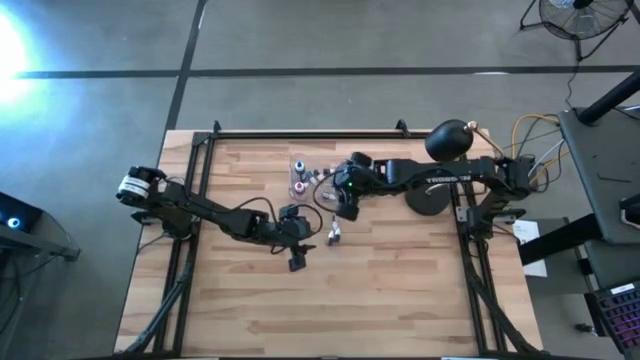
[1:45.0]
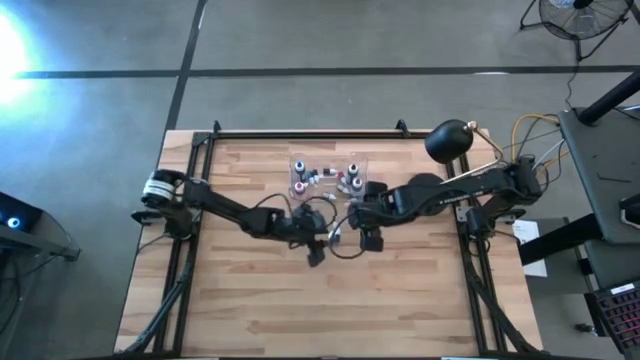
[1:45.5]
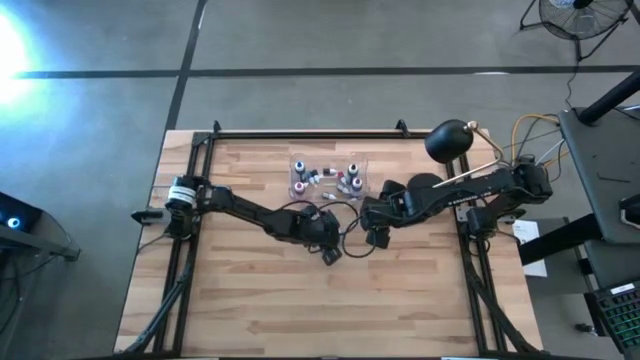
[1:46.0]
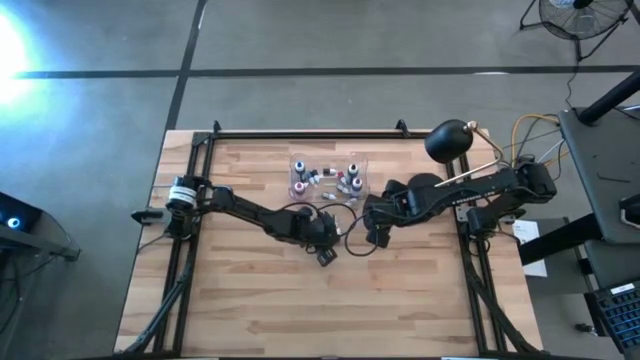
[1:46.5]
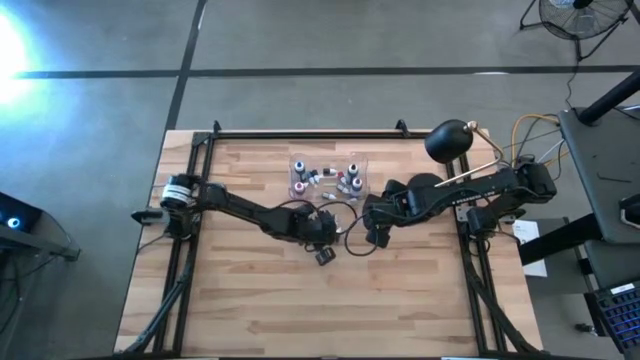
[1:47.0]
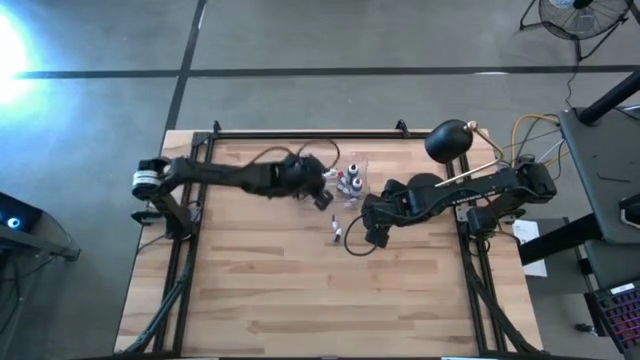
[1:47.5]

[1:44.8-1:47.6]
Task: Pick & Place food coloring
Put the small red food coloring bottle into the transparent bin

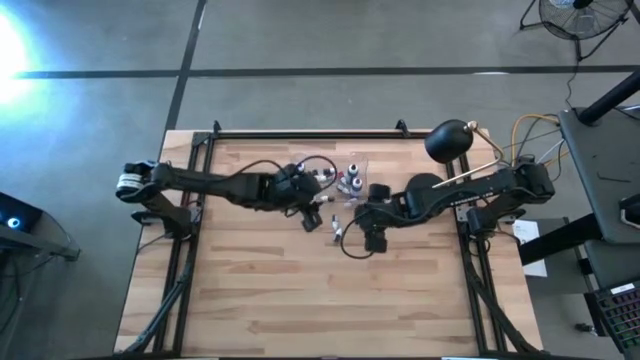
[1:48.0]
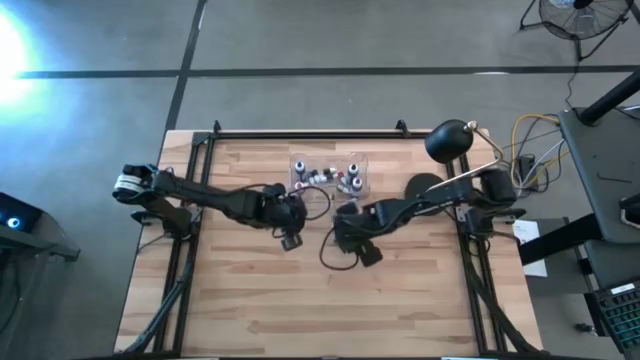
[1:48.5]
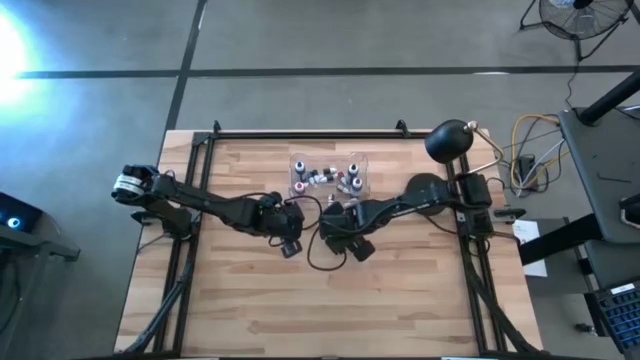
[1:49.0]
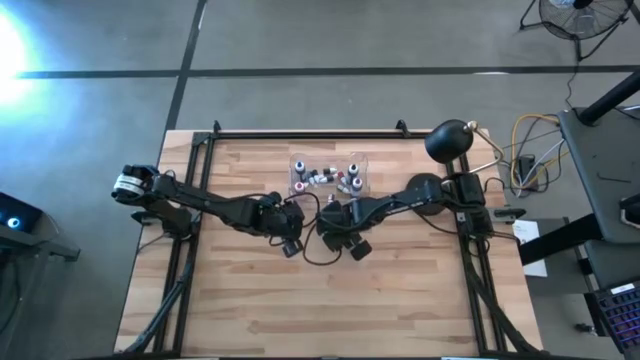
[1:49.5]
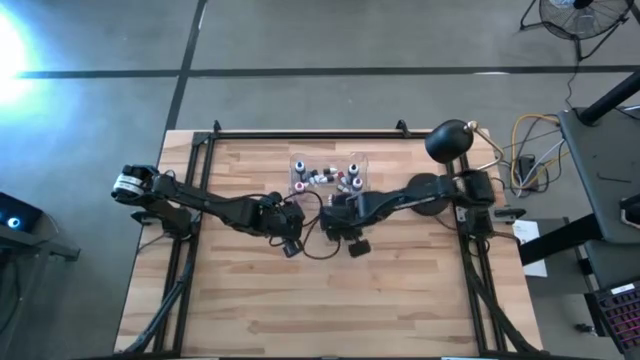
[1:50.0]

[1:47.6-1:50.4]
Put the small blue food coloring bottle into the transparent bin

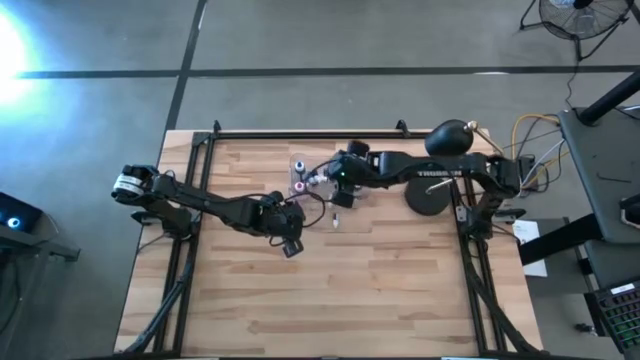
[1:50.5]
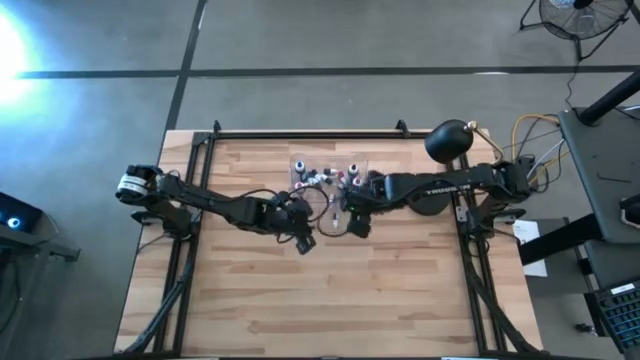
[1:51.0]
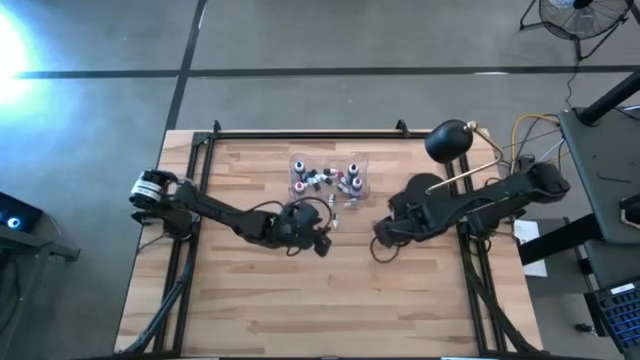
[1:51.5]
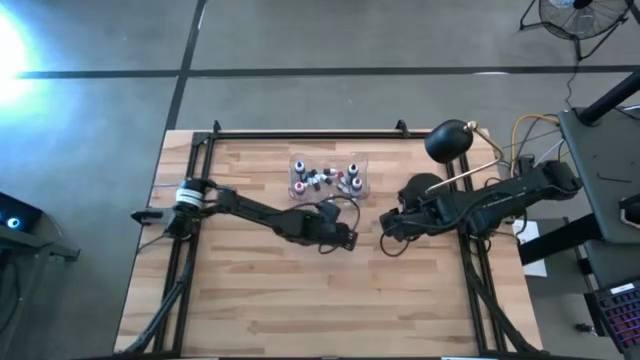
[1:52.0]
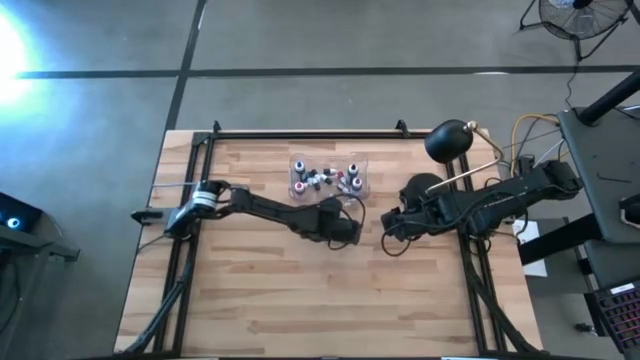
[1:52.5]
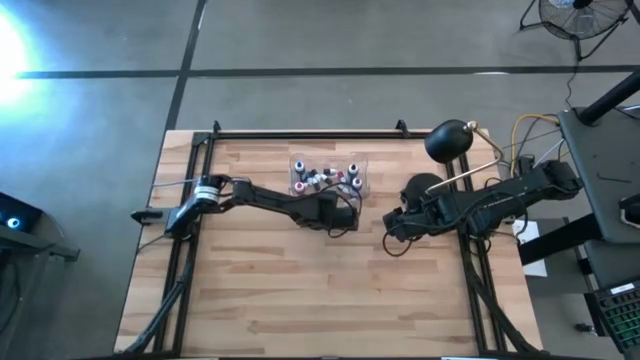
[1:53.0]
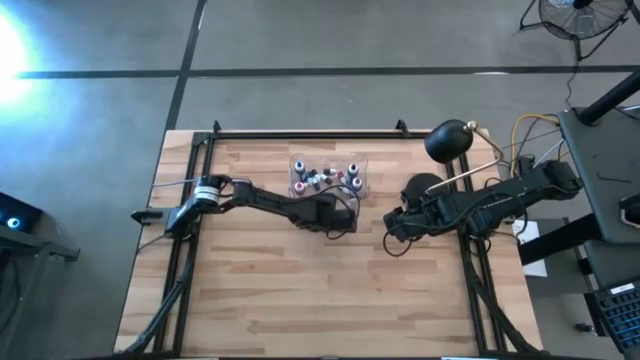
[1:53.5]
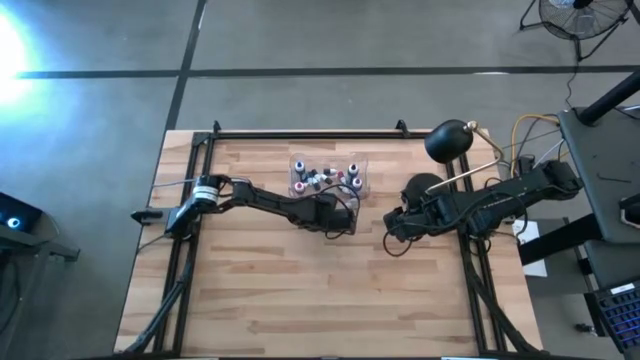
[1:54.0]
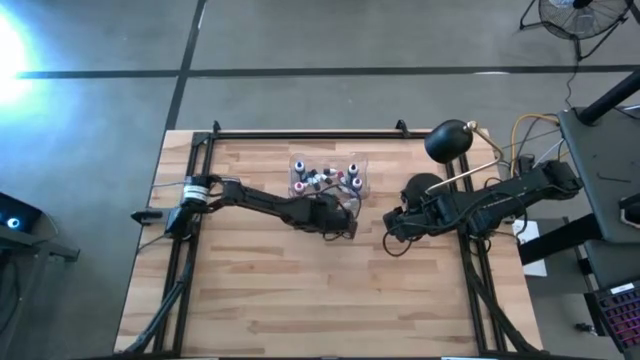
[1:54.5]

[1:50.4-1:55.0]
Put the small blue food coloring bottle into the transparent bin

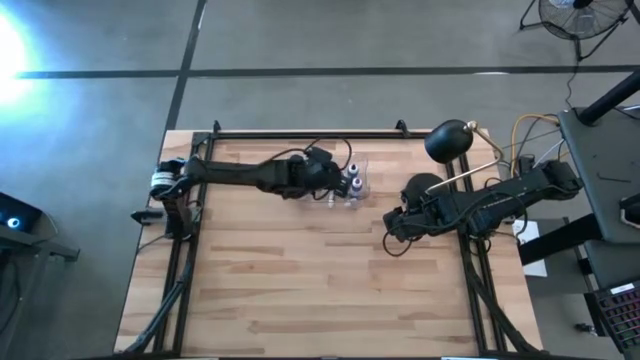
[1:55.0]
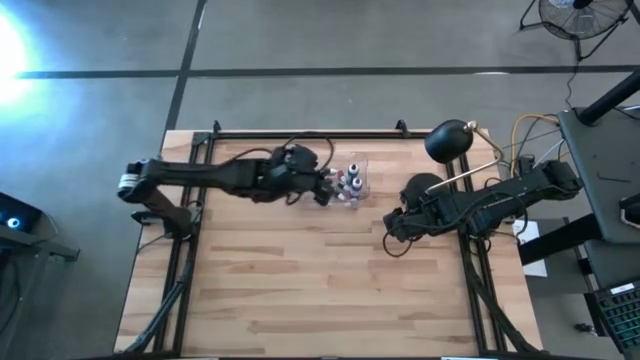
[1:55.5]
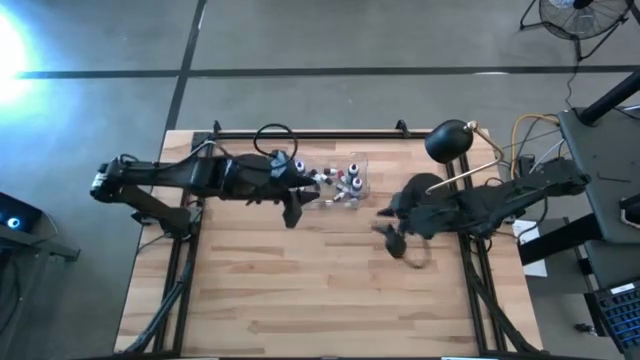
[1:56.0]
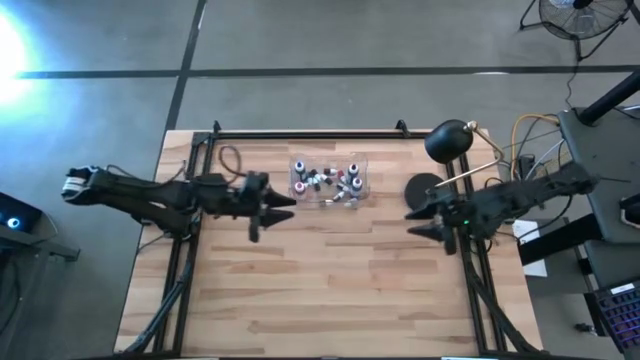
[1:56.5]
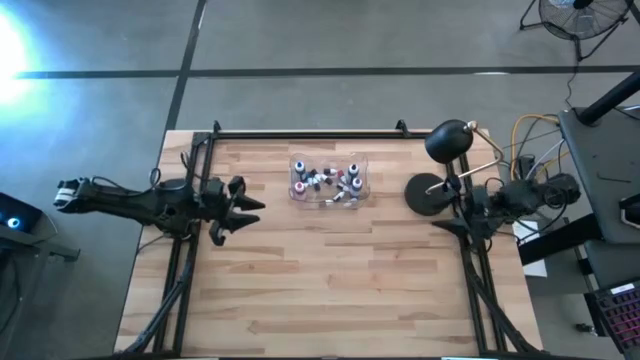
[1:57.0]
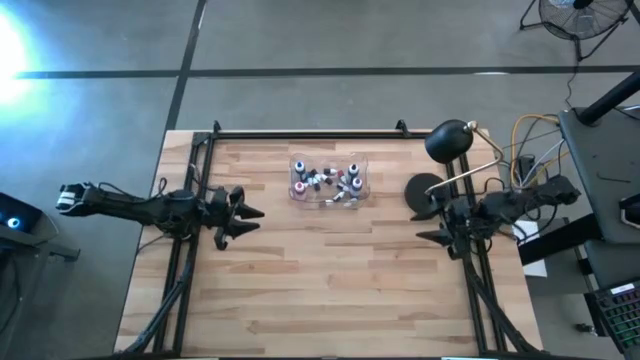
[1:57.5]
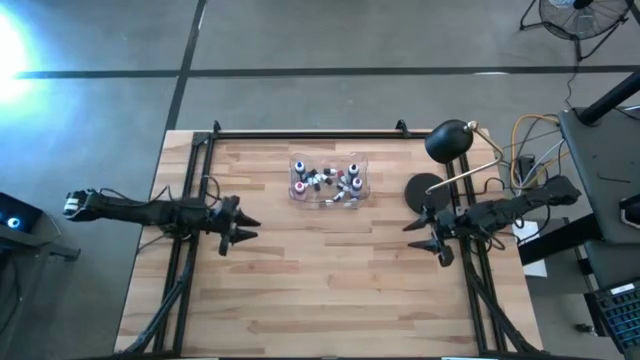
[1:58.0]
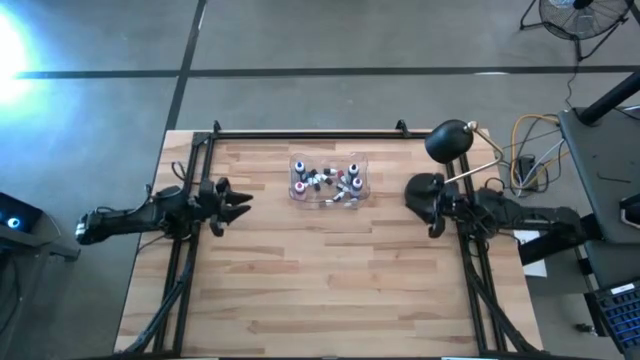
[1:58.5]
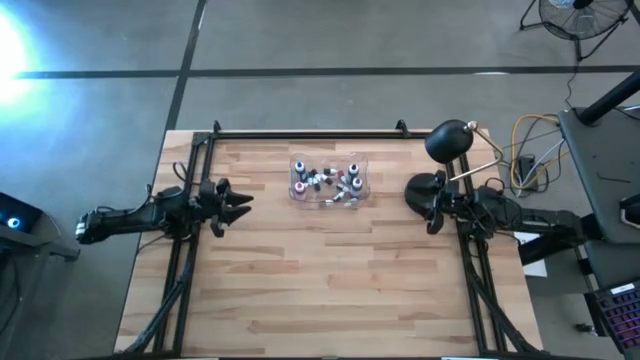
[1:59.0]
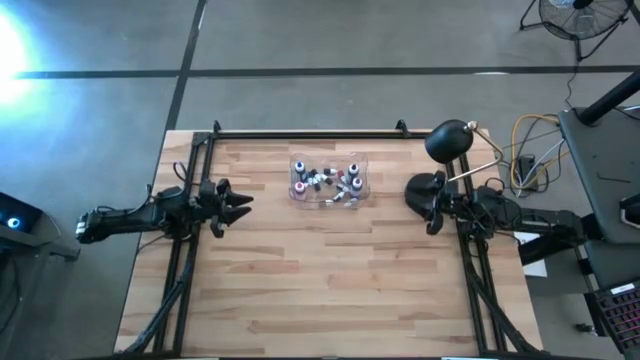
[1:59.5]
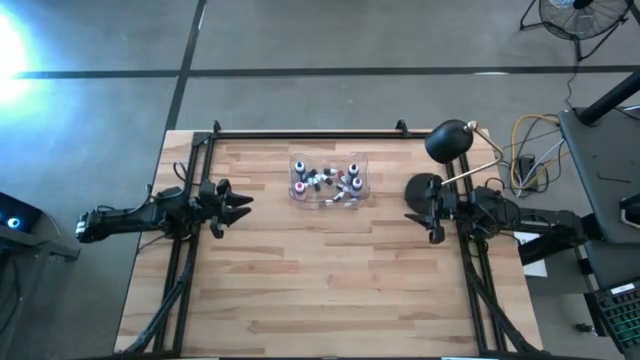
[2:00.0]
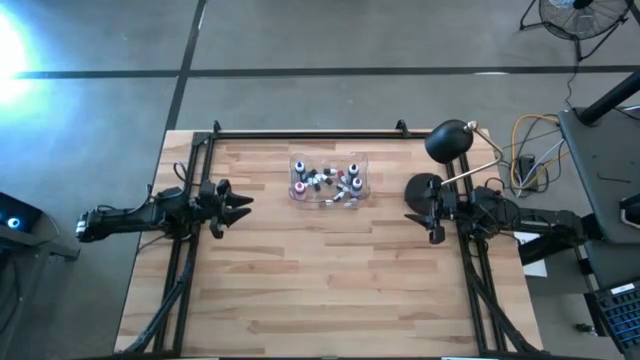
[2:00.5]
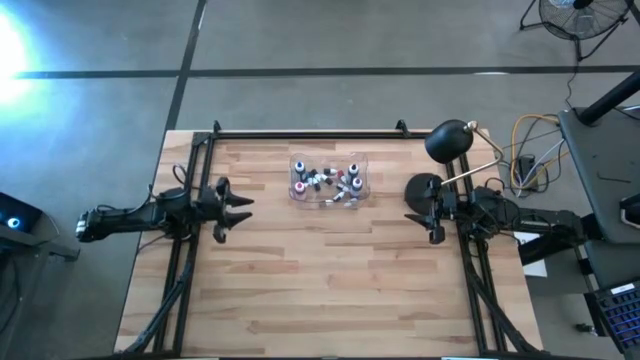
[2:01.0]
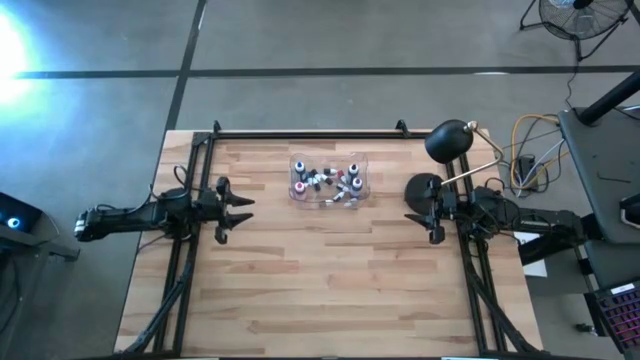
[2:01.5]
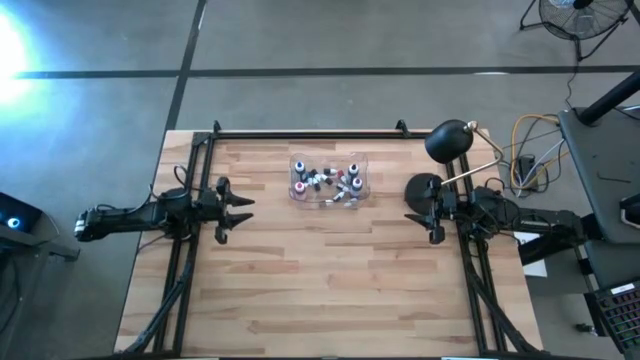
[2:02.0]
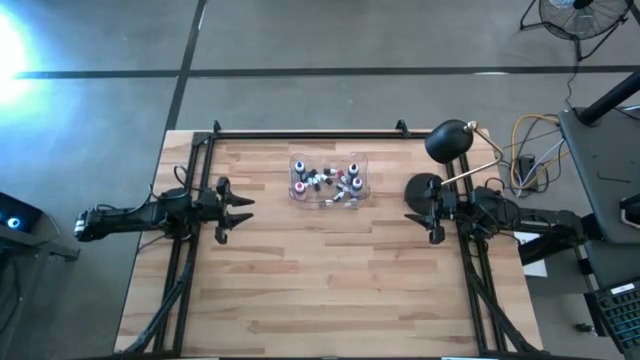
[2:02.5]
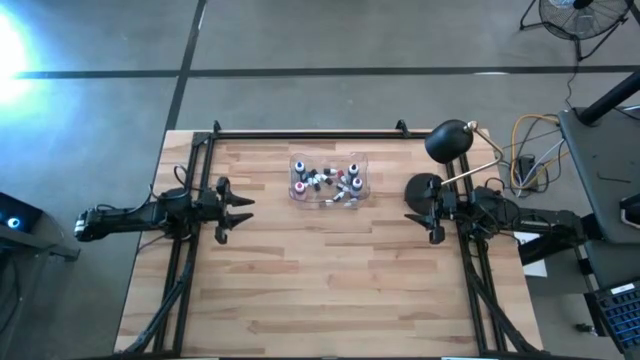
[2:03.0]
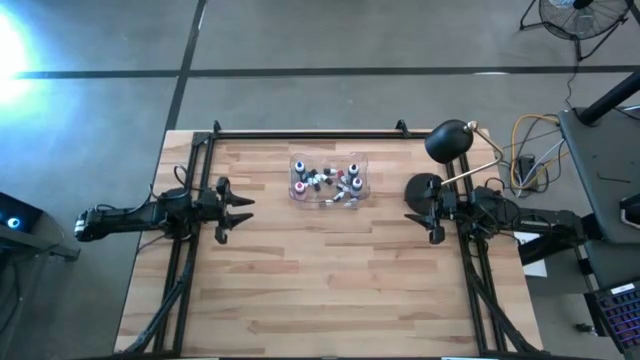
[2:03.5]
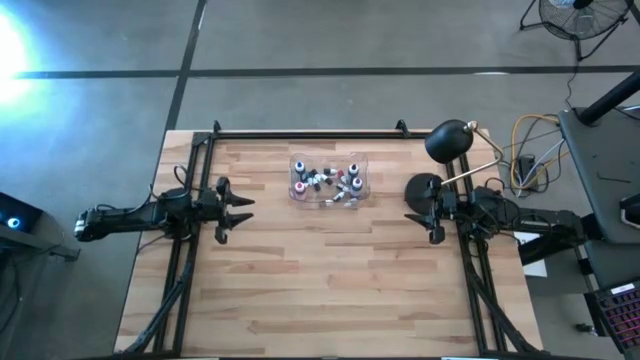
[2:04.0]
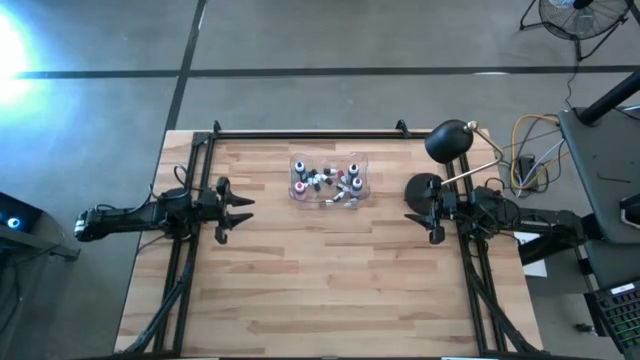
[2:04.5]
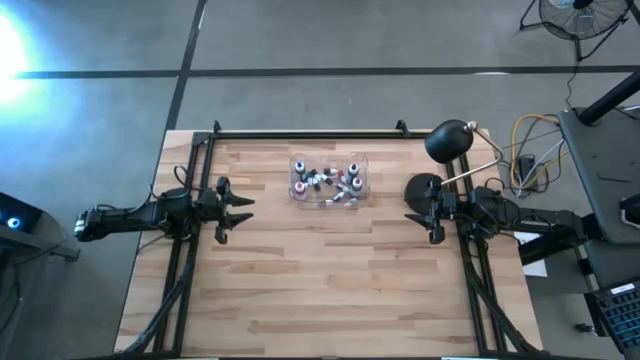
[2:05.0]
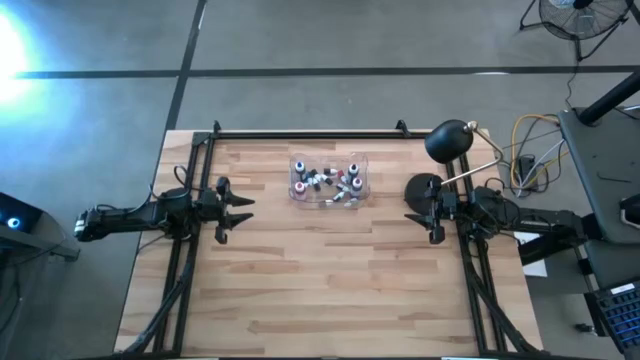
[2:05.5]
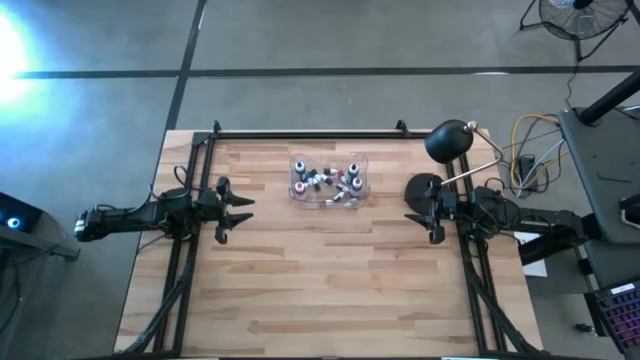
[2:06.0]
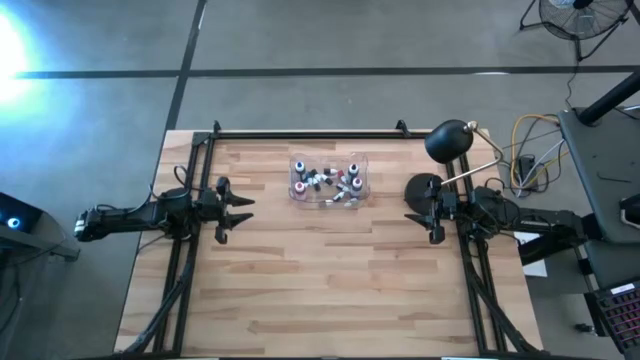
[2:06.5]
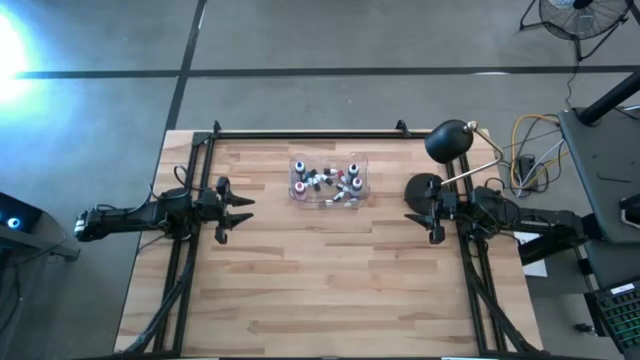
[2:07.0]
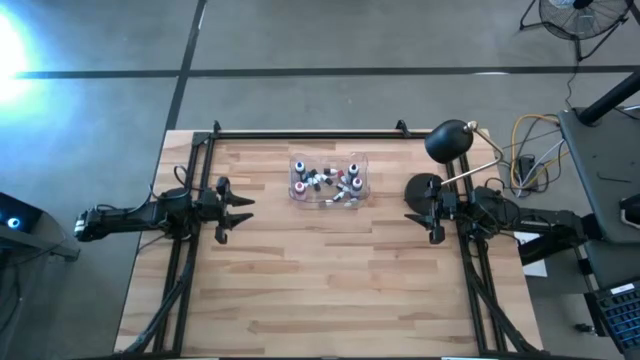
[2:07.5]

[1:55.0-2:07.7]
Return to Home Position
